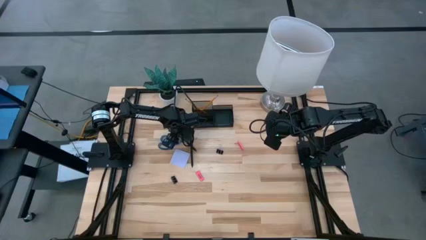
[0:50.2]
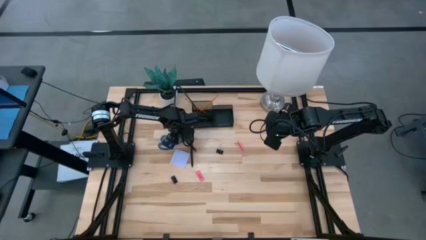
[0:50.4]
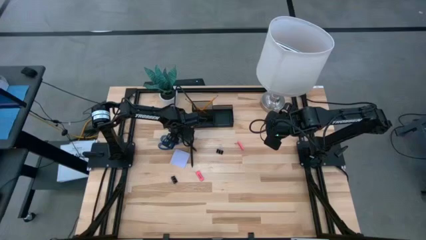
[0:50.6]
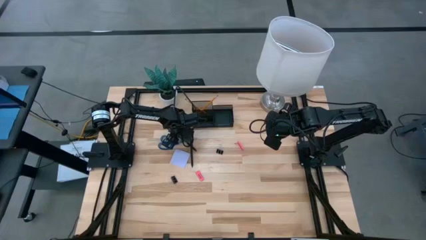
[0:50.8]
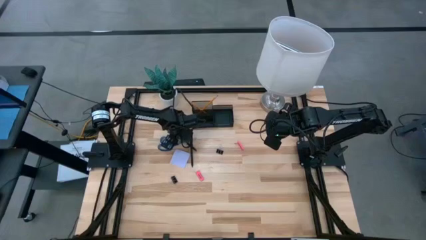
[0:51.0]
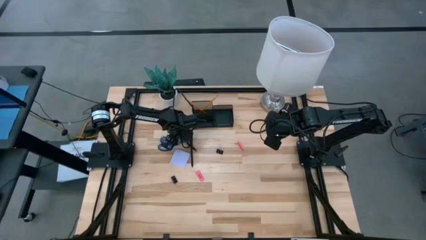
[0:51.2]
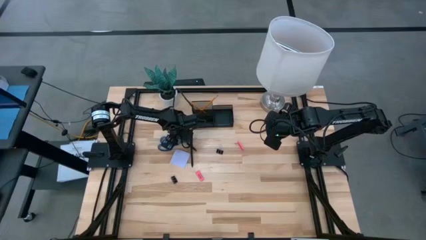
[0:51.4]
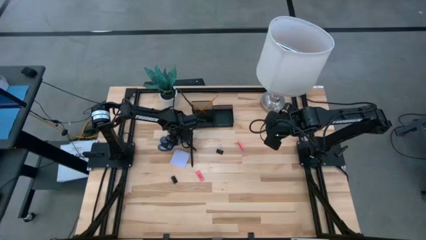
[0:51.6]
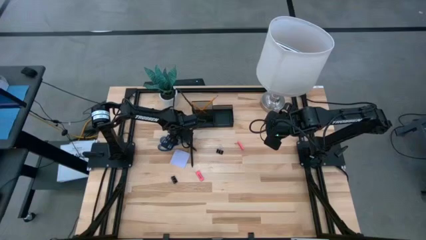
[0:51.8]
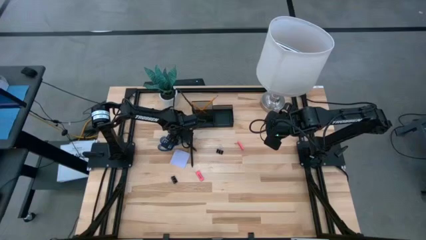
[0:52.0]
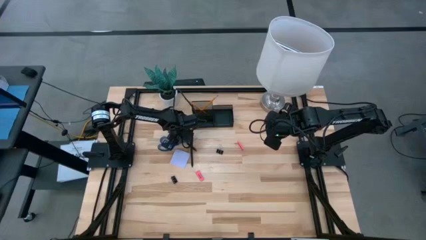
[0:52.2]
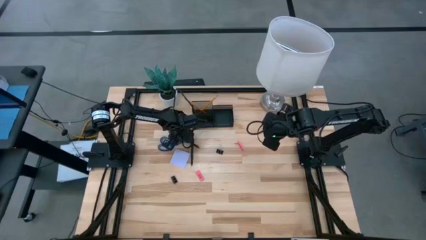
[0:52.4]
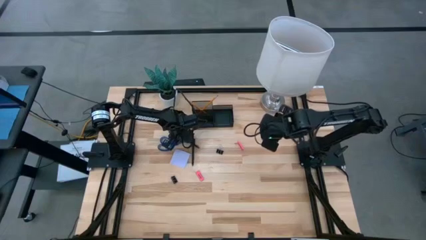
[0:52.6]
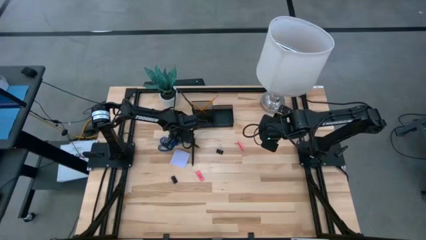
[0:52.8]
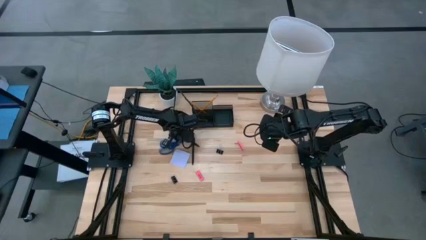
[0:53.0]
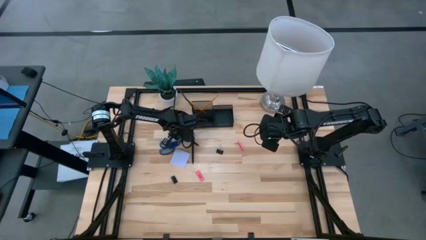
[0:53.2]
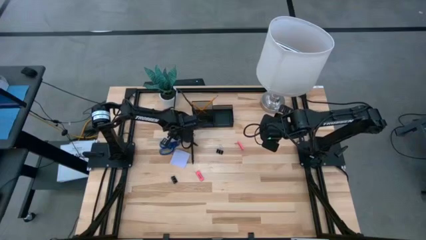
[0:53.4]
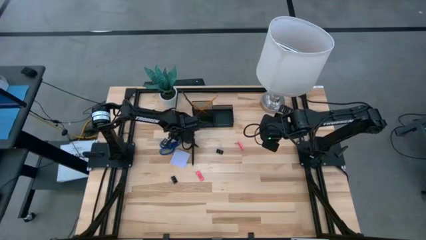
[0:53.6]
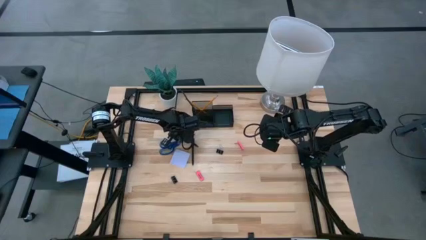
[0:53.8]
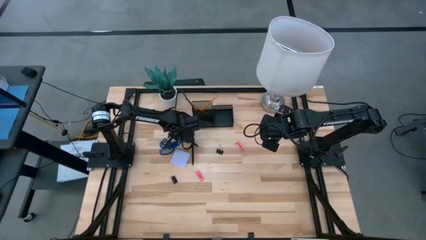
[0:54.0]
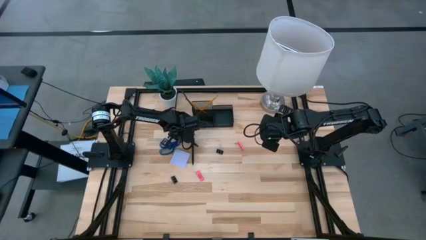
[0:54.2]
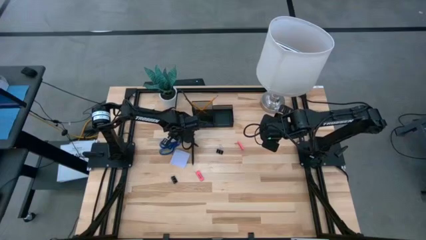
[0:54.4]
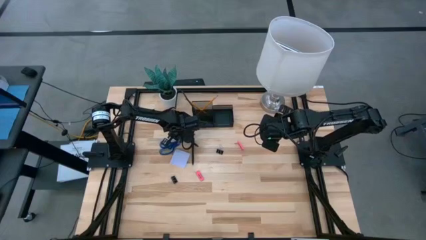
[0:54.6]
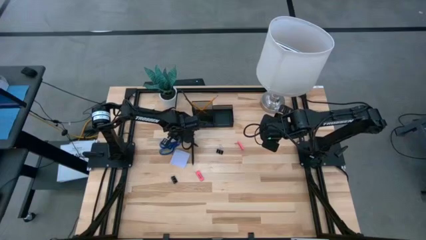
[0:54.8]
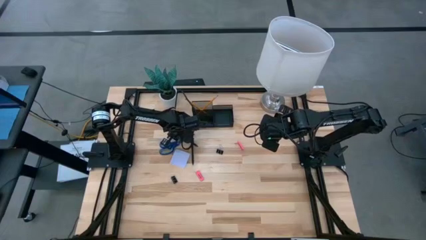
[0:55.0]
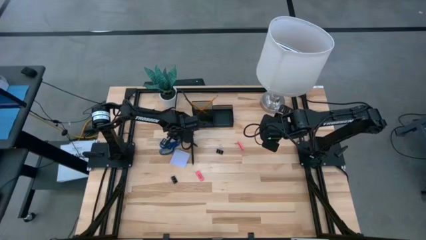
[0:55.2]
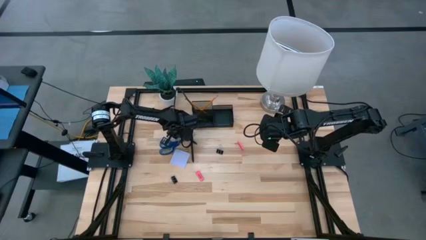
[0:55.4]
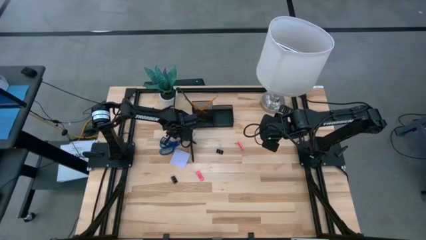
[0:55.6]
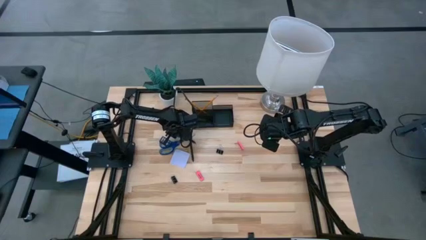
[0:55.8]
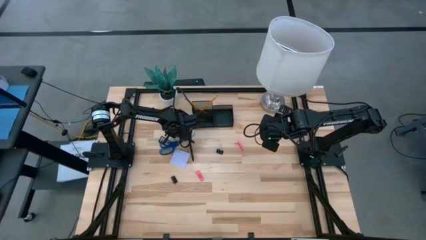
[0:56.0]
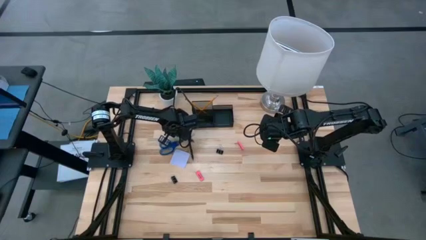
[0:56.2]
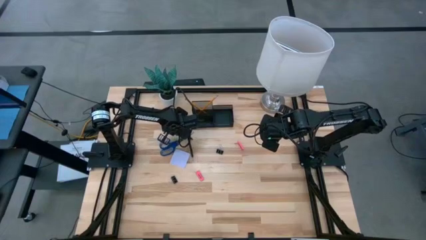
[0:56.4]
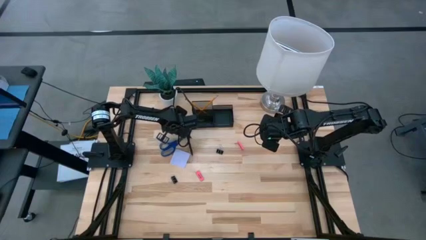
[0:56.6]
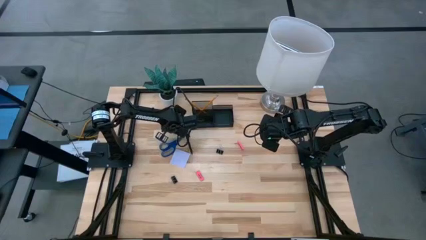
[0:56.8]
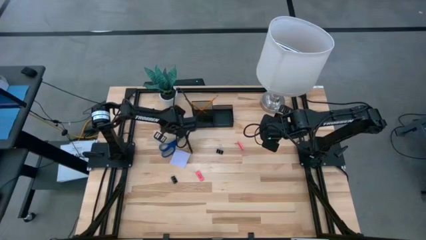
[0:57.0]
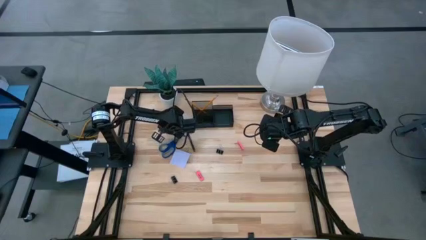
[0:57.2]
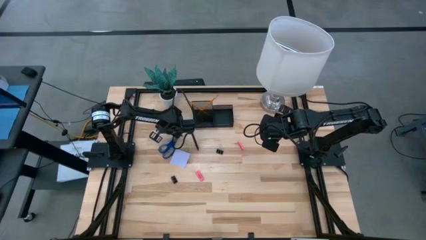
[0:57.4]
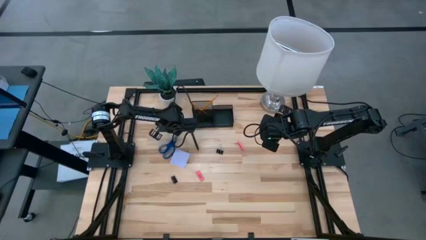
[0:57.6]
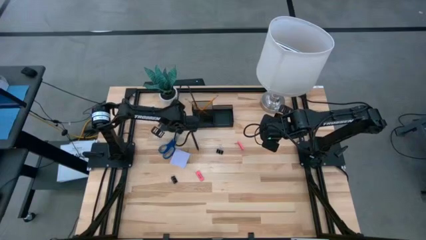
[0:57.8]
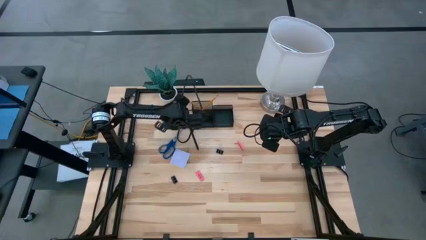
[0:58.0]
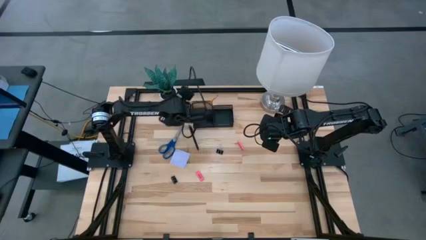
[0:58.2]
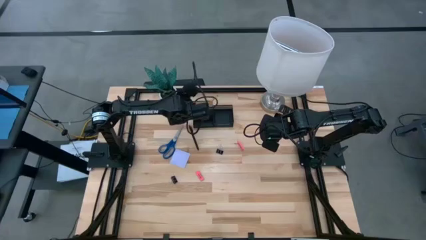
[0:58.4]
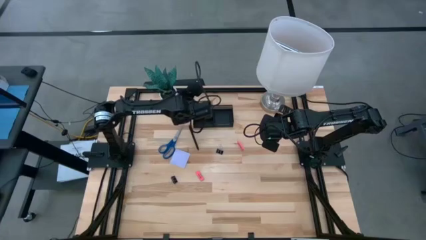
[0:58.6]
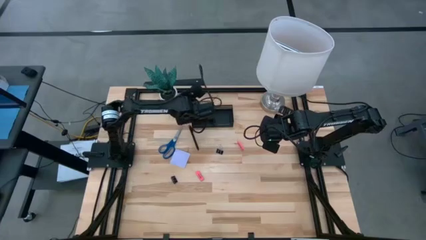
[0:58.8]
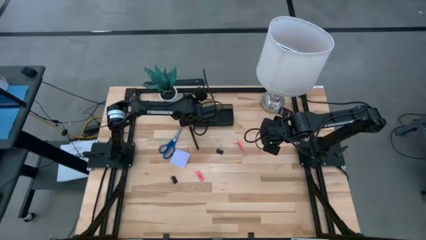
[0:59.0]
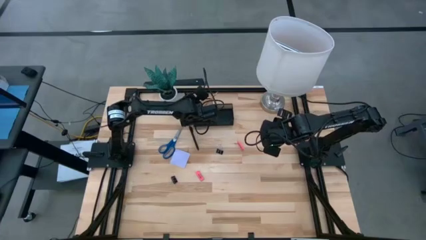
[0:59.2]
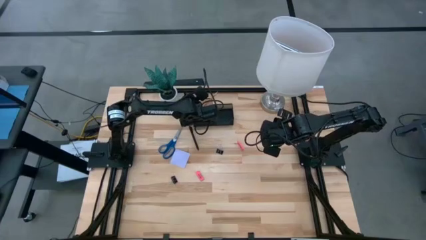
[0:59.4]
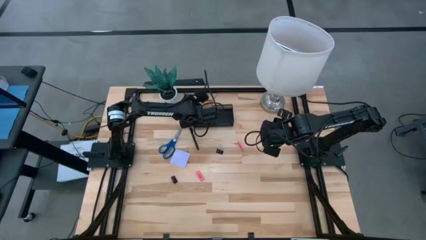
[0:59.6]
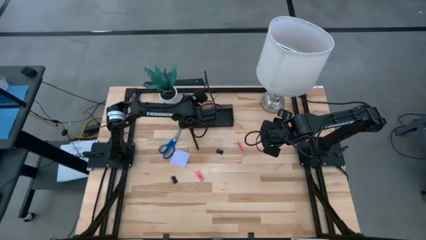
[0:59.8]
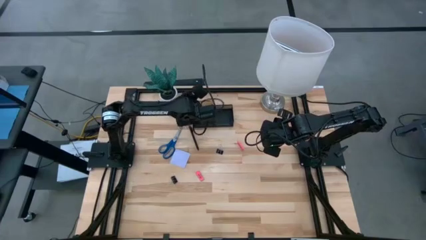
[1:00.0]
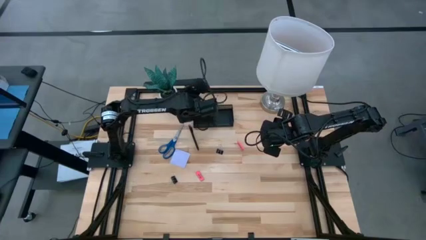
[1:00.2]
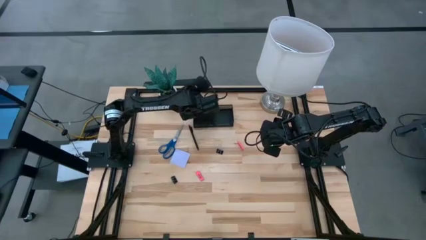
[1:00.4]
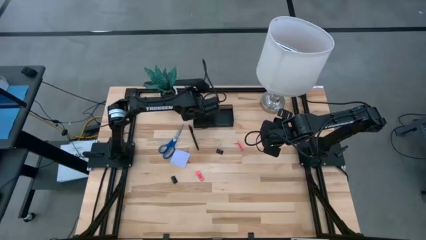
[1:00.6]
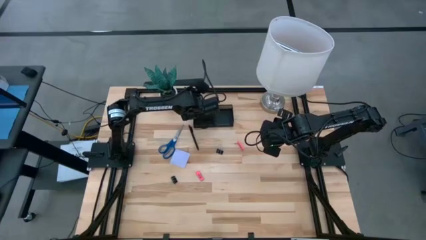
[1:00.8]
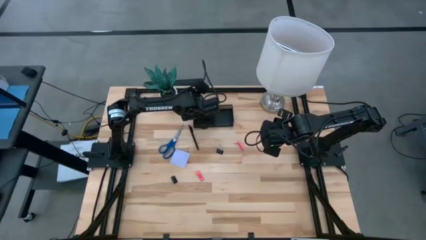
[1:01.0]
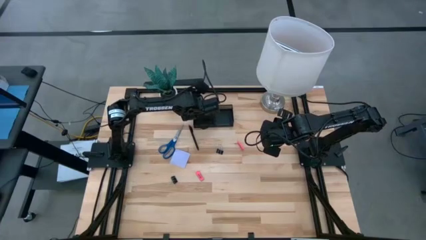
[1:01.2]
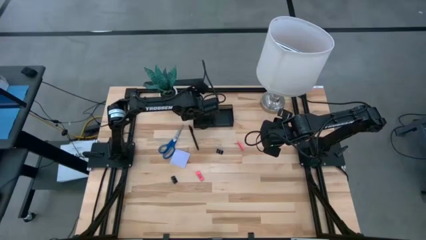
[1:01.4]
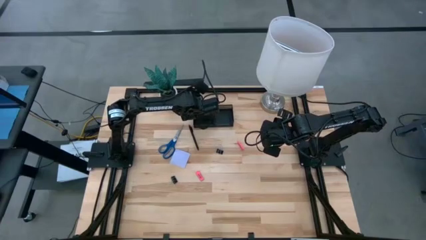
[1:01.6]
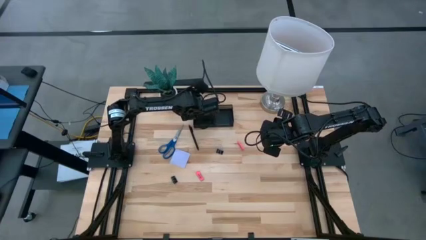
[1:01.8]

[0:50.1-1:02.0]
Task: Pick and place office supplies into organizer
Put the top black ball pen into the desk organizer

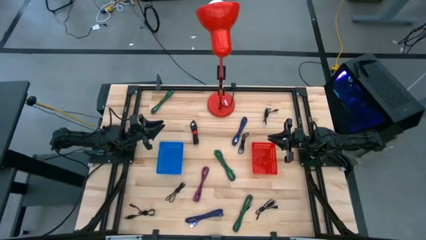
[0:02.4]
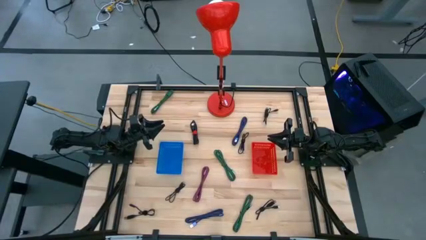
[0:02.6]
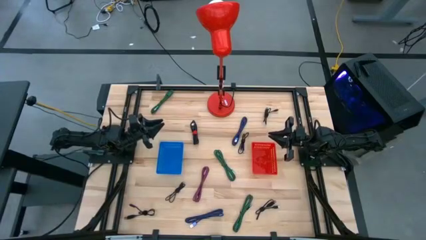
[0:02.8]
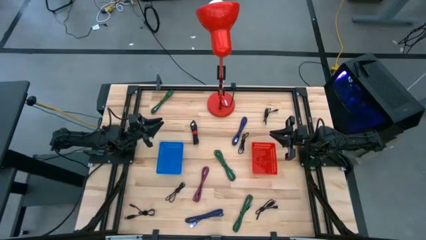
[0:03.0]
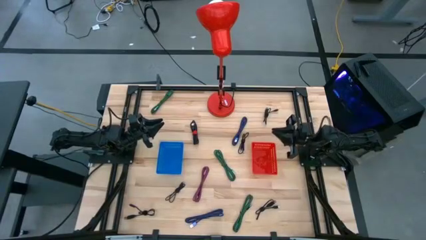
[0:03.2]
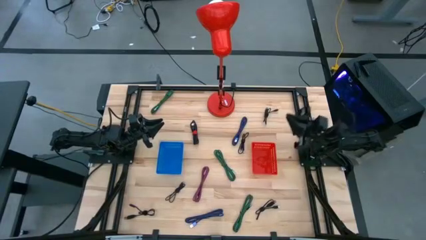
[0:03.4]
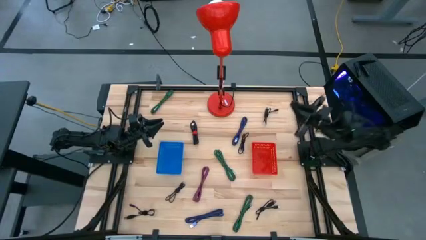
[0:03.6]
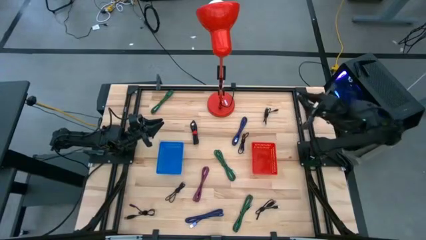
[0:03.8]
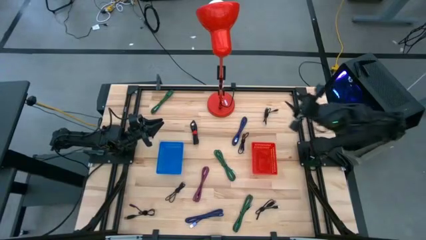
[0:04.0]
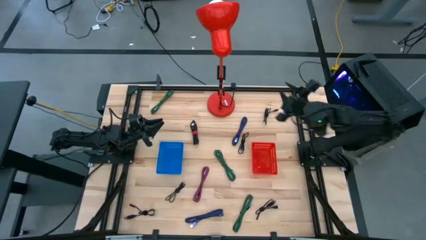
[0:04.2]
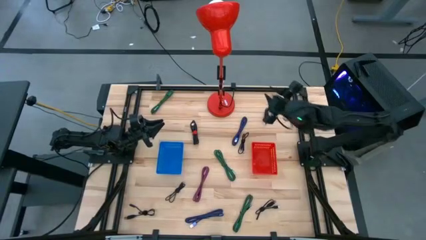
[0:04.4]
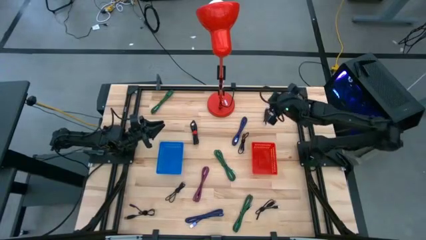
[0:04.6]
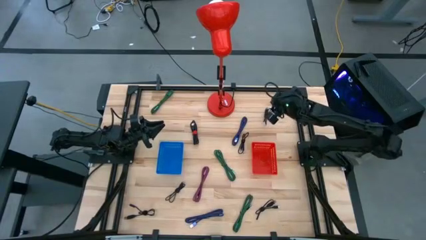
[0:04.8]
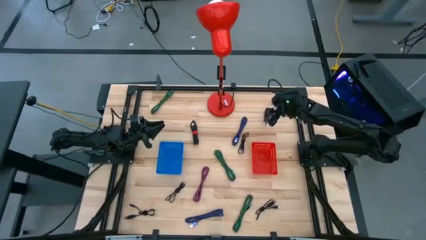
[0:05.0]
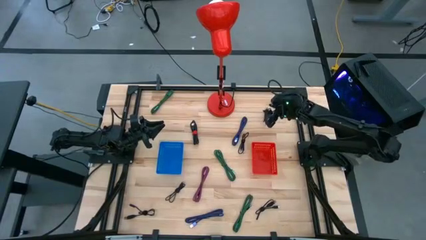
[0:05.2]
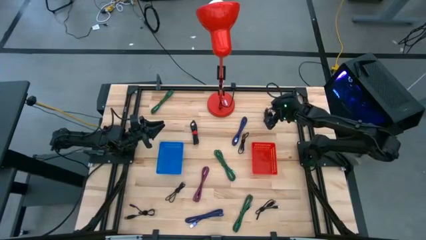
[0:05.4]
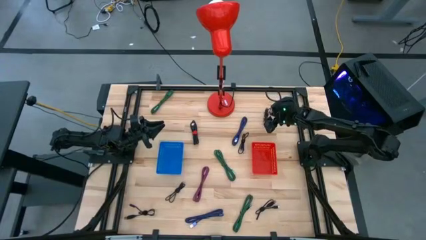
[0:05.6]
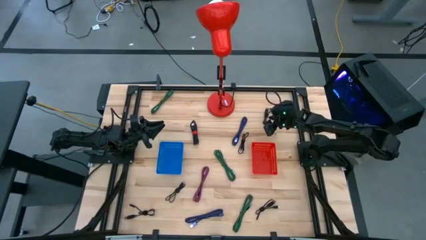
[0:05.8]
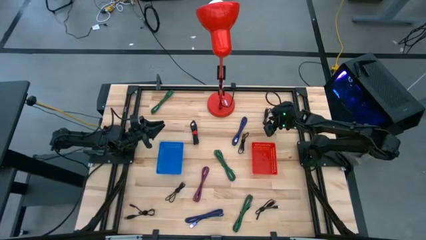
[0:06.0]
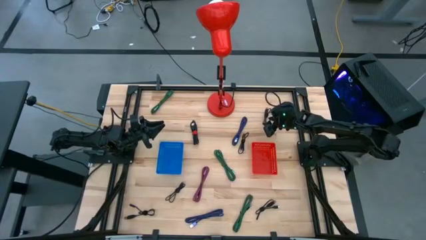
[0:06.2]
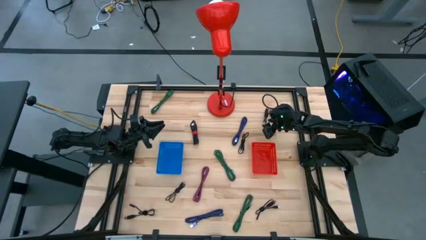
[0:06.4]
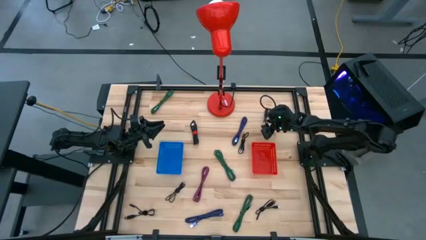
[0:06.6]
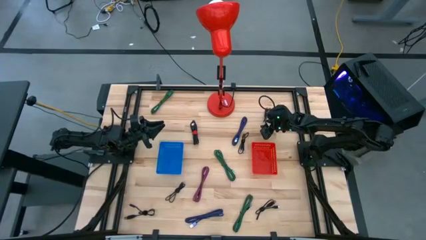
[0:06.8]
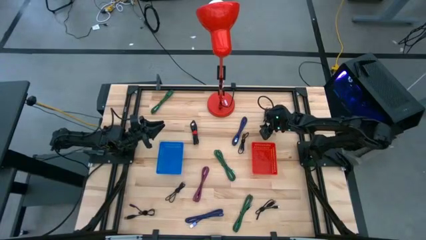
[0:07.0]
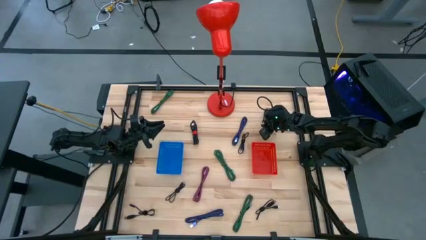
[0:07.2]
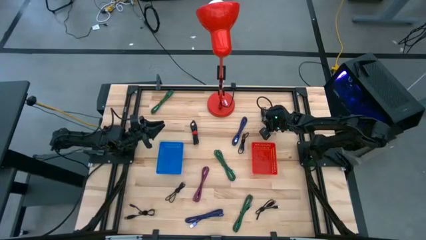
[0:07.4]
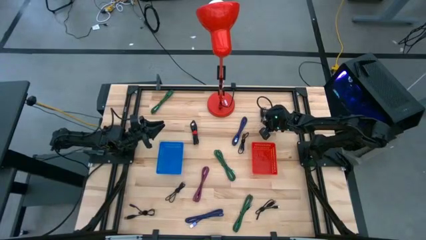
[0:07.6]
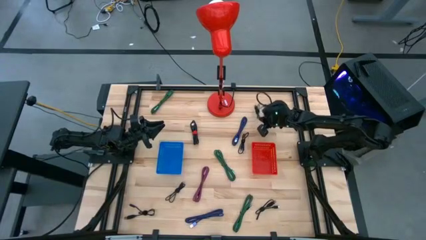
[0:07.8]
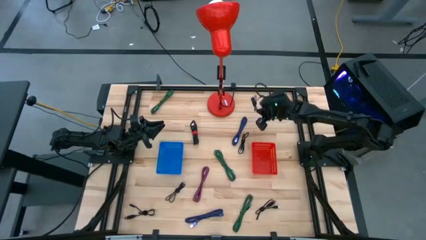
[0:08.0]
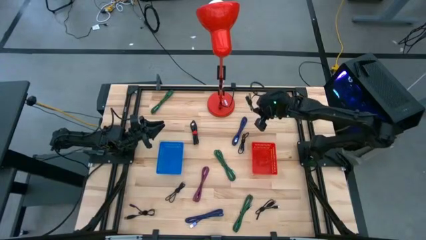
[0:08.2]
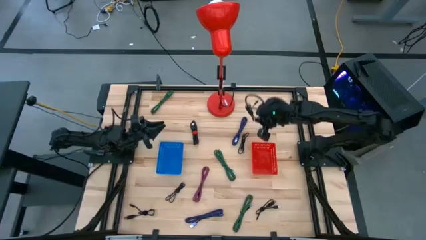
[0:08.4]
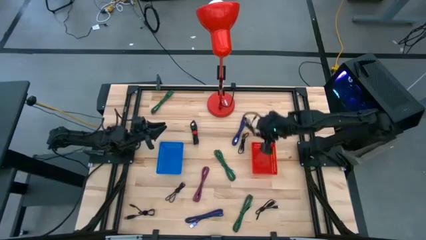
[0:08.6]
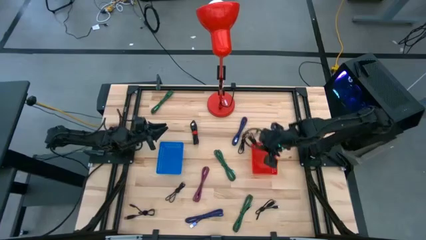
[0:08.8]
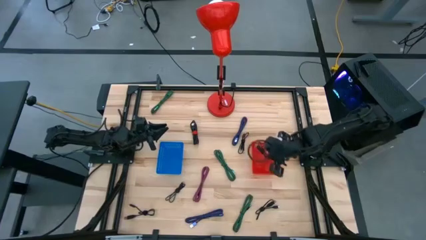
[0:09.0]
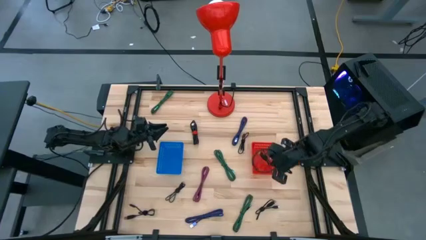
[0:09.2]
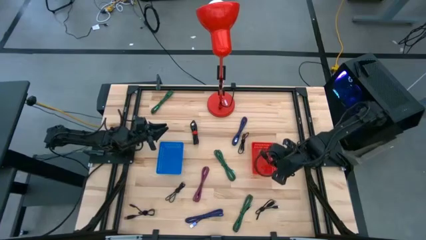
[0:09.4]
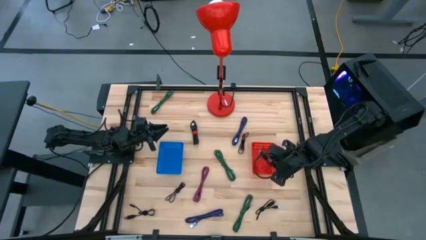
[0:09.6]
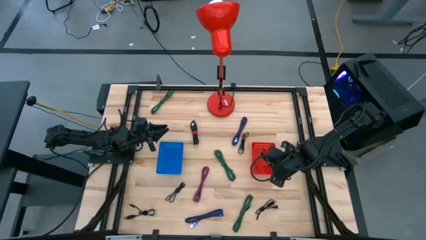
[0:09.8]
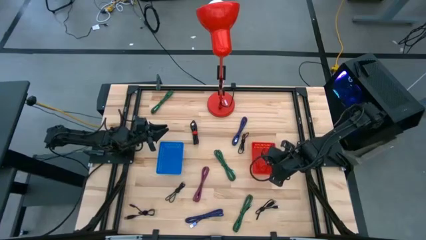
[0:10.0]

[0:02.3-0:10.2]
Task: Pick & Place USB Port
Put the black charger cable into the red bin
